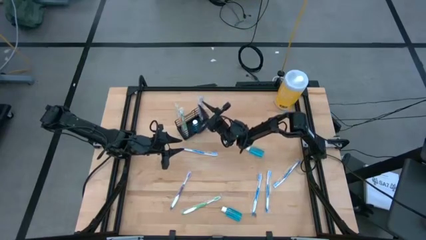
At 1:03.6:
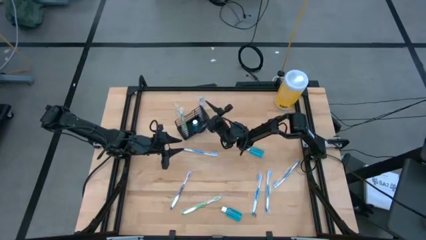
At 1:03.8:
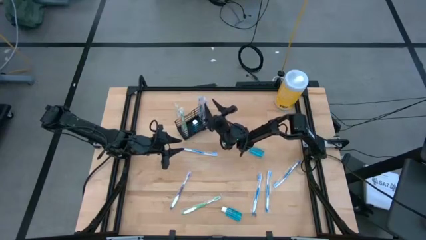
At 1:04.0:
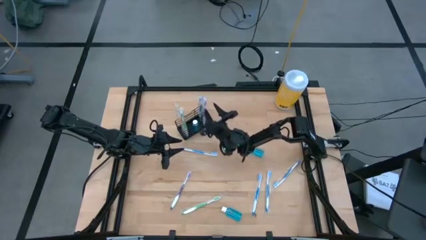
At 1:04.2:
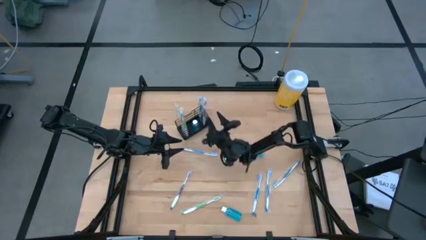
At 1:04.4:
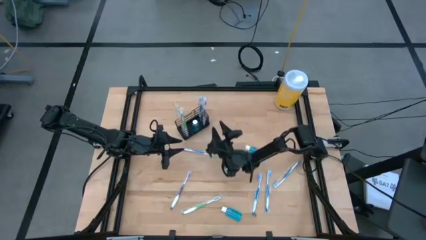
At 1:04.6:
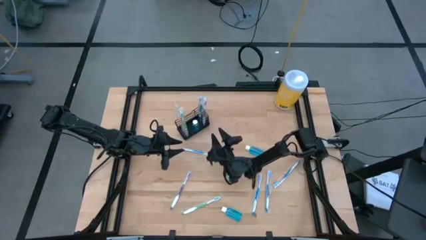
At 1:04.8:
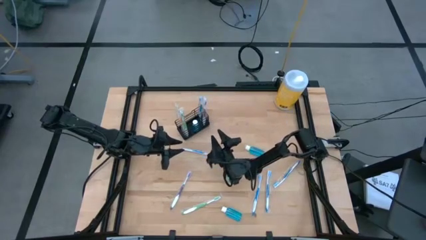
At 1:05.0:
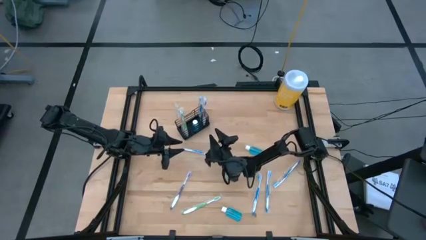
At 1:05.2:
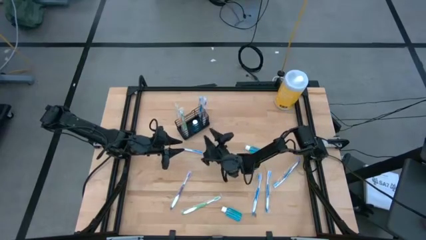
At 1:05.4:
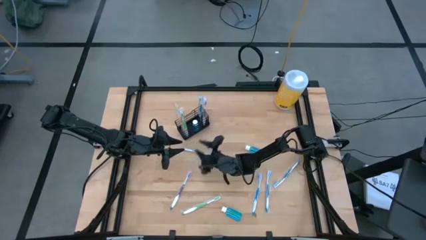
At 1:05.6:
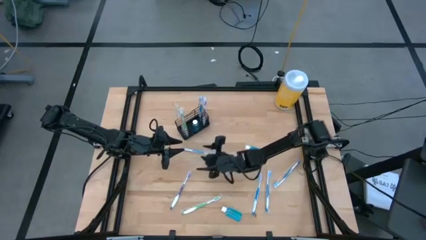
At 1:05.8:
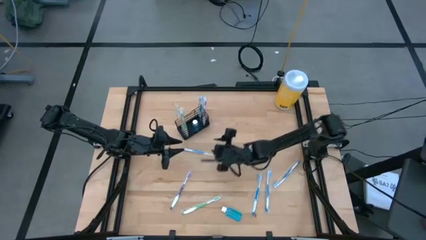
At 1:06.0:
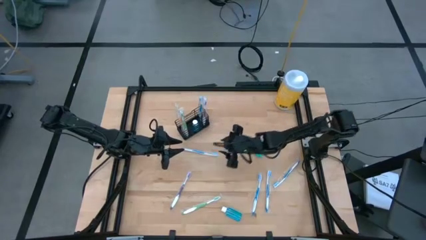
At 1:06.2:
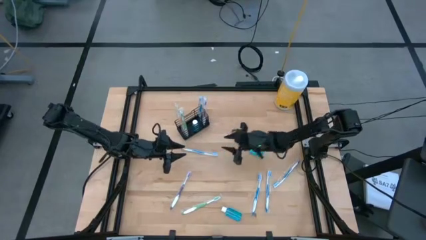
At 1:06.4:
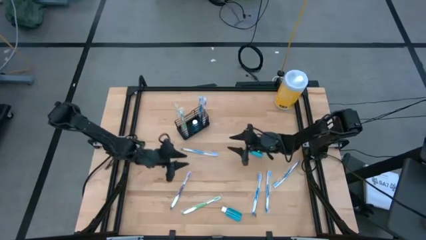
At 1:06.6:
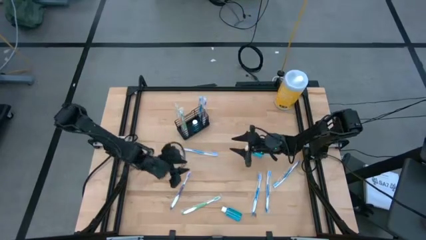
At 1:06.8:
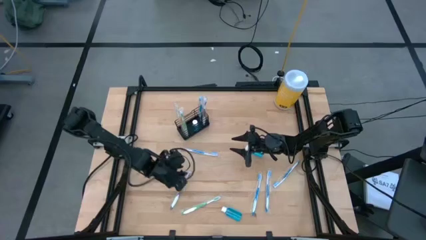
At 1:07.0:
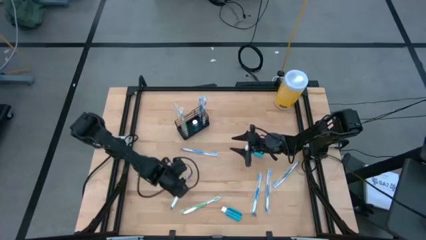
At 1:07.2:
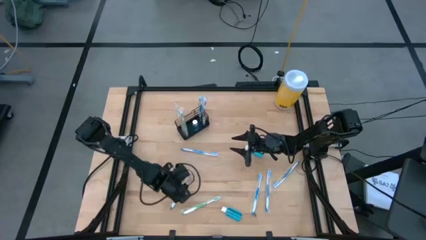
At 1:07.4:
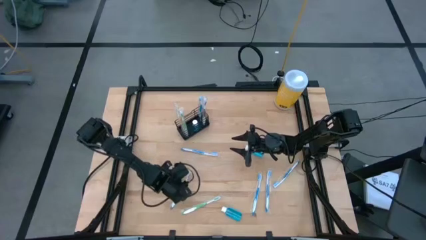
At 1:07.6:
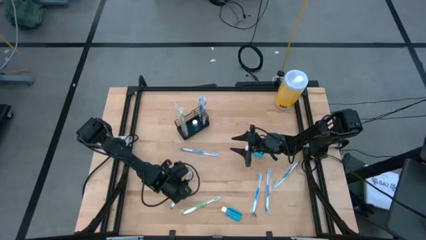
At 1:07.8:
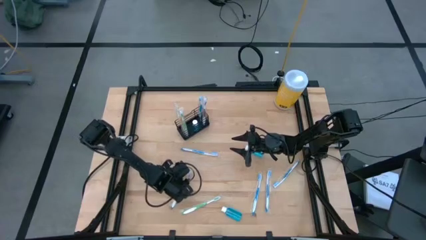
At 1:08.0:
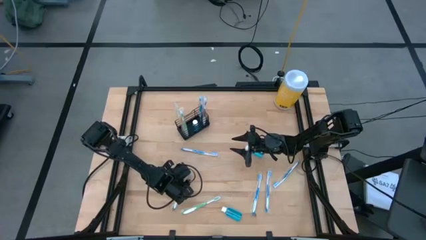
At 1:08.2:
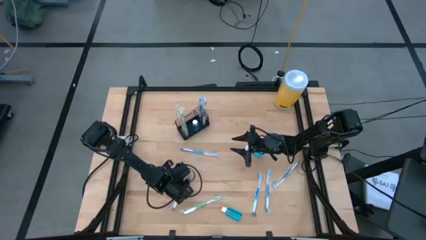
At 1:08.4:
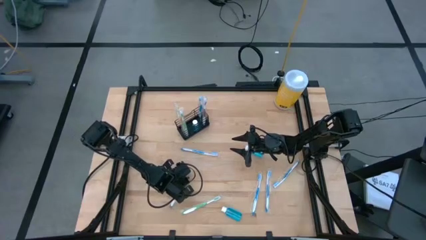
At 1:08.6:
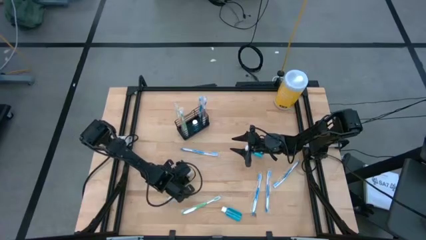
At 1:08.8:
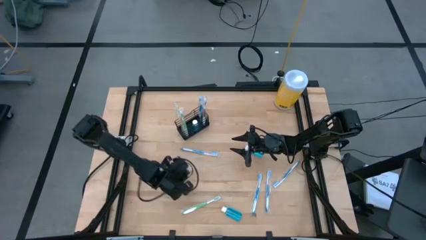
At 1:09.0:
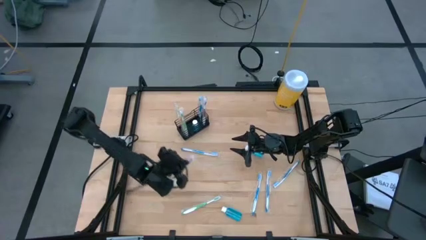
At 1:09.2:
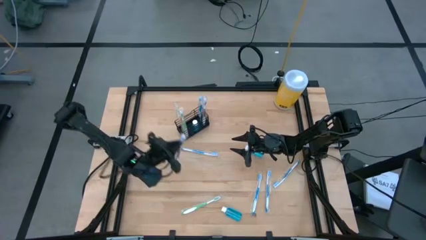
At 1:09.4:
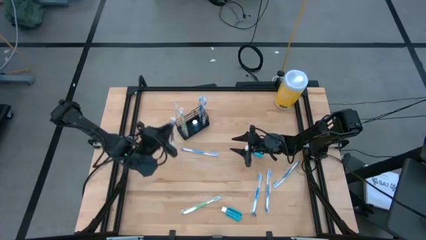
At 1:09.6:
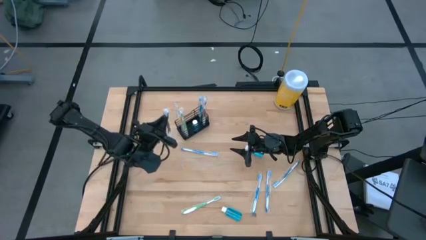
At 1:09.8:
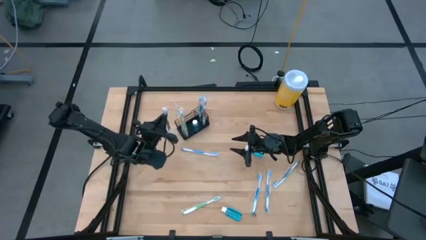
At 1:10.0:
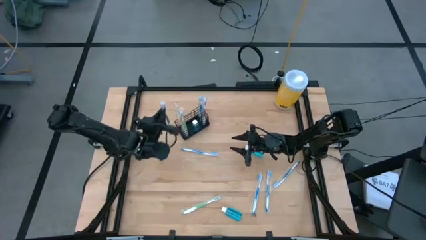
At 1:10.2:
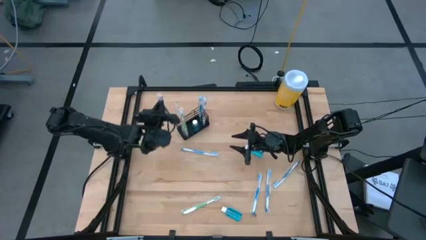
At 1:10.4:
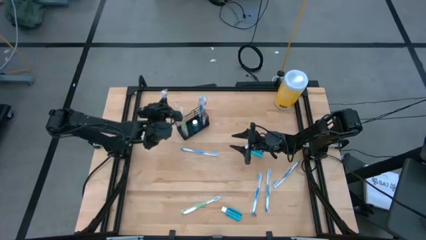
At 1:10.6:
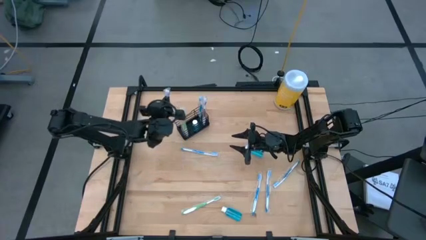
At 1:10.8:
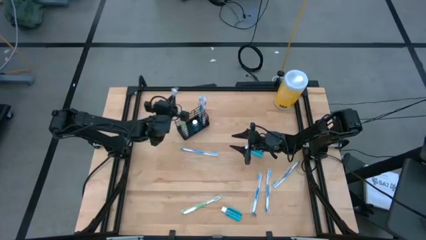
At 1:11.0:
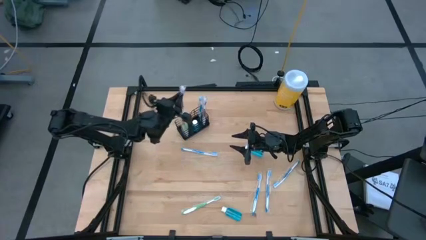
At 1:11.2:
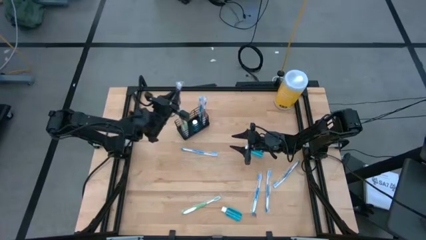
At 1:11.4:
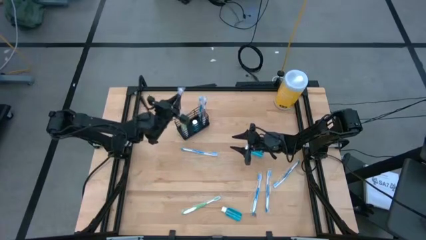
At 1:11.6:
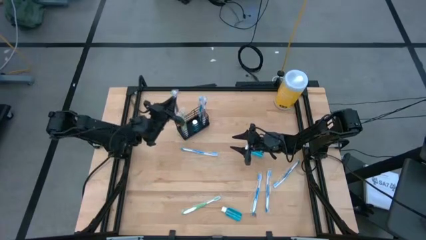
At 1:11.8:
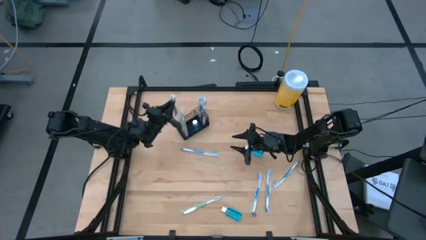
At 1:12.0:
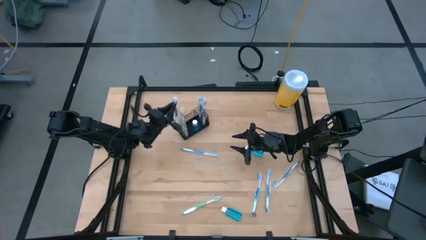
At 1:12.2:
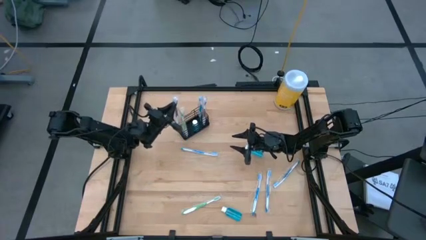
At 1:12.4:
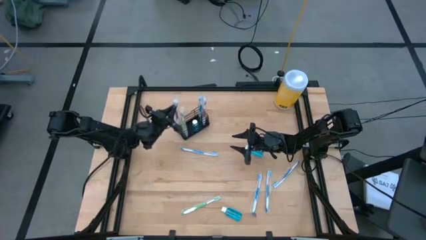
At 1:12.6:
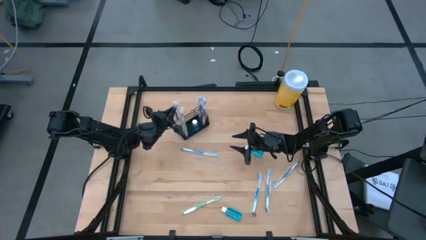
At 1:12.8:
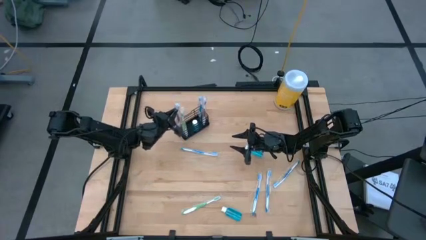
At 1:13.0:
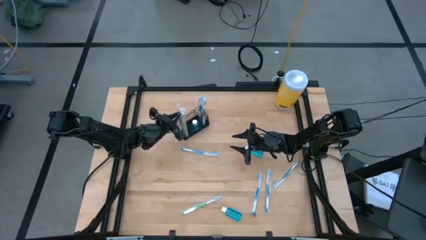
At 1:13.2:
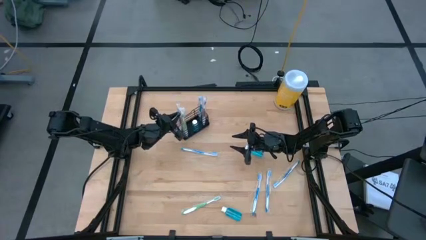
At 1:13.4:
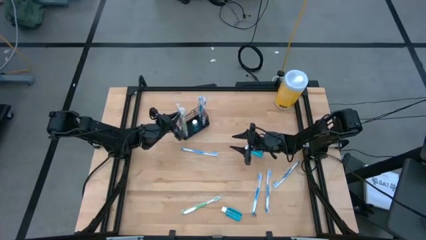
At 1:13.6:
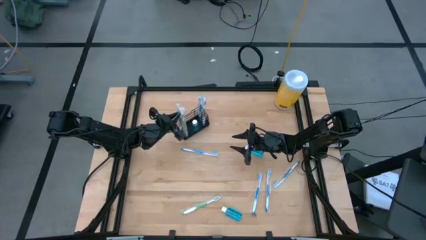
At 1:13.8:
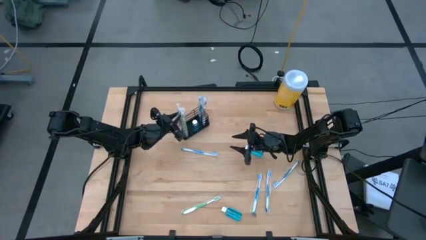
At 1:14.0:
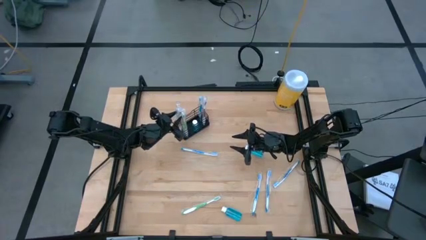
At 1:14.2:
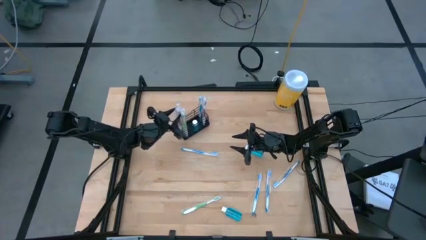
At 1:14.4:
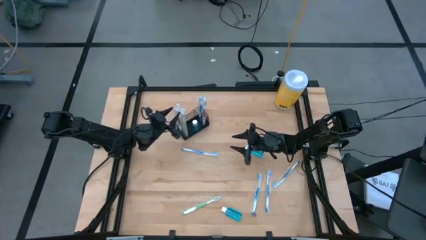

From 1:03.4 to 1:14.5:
Task: Pick & Place toothbrushing station
Put the violet toothbrush into the black wire organizer

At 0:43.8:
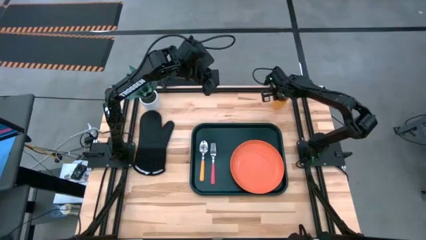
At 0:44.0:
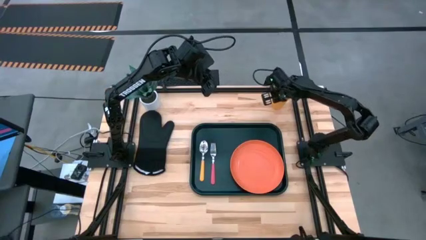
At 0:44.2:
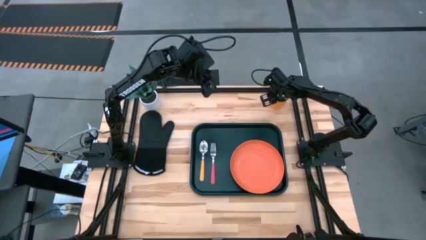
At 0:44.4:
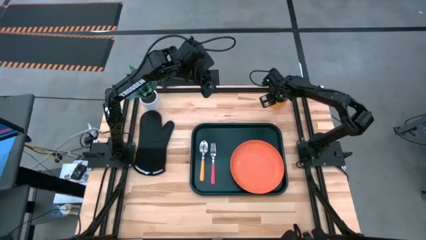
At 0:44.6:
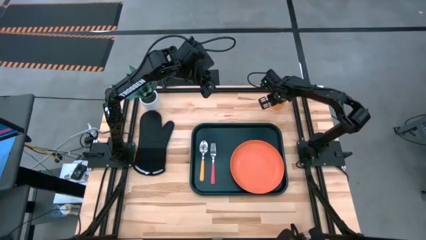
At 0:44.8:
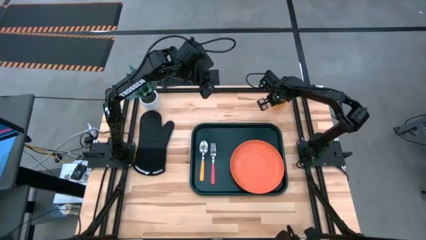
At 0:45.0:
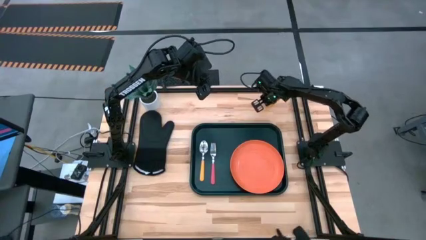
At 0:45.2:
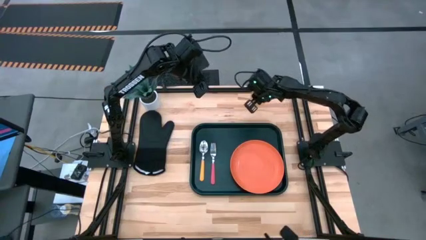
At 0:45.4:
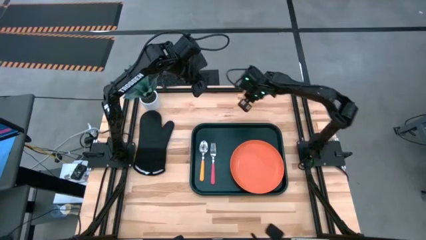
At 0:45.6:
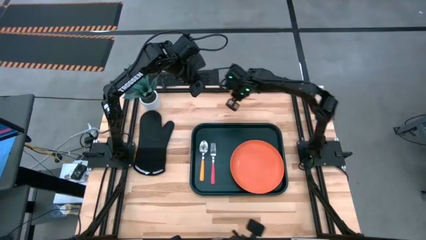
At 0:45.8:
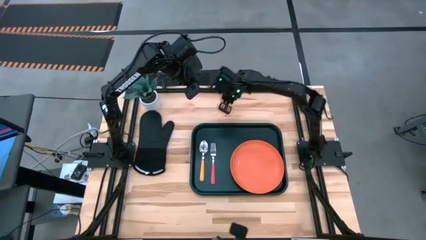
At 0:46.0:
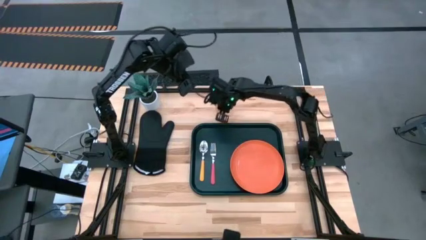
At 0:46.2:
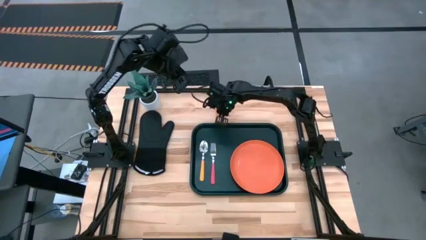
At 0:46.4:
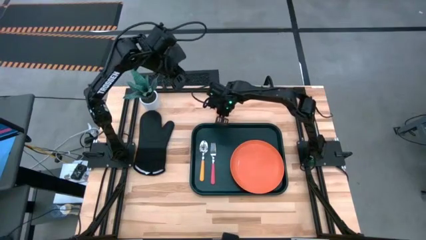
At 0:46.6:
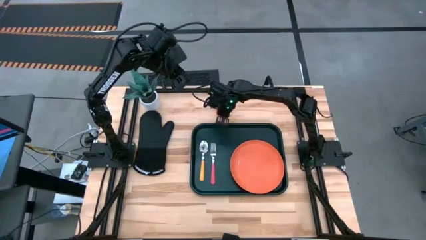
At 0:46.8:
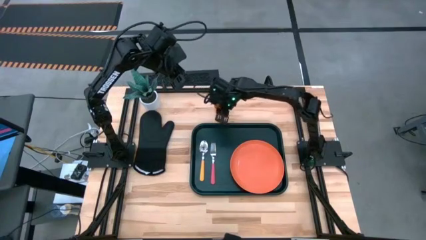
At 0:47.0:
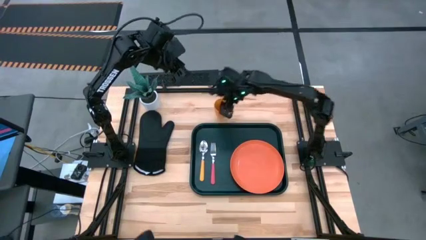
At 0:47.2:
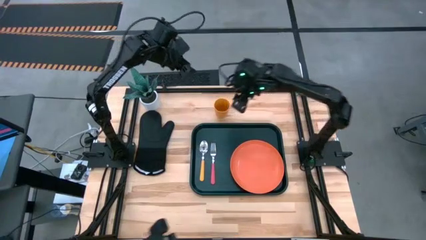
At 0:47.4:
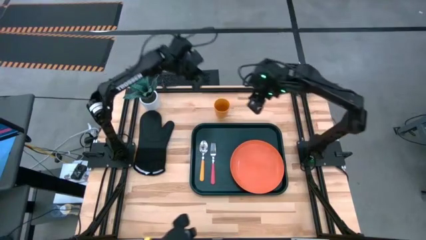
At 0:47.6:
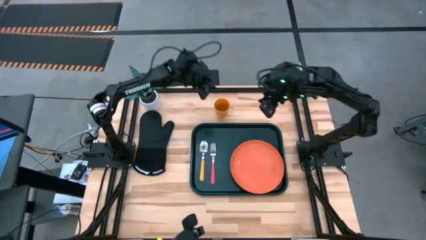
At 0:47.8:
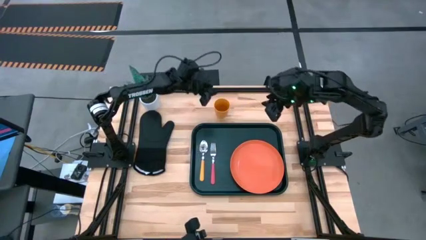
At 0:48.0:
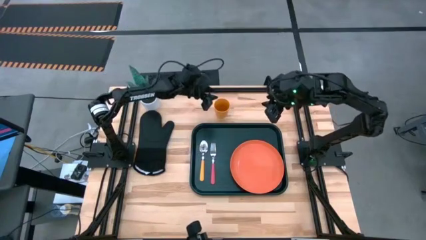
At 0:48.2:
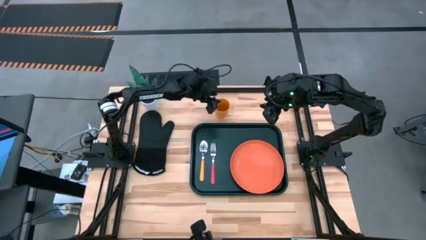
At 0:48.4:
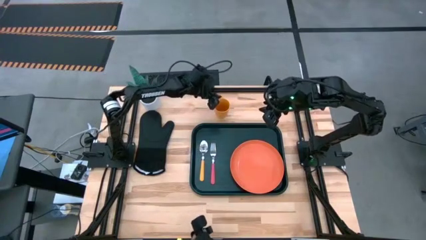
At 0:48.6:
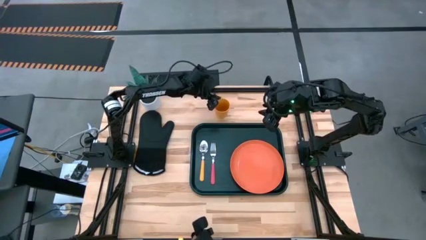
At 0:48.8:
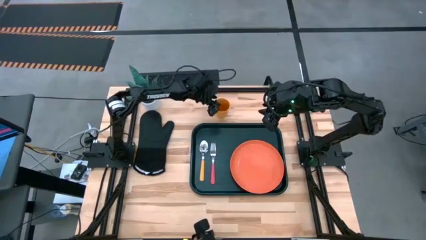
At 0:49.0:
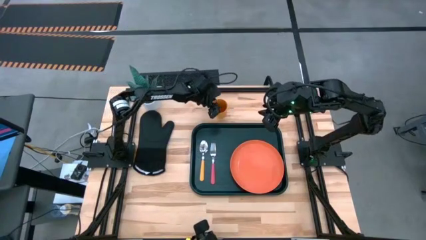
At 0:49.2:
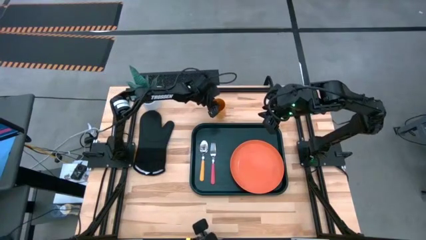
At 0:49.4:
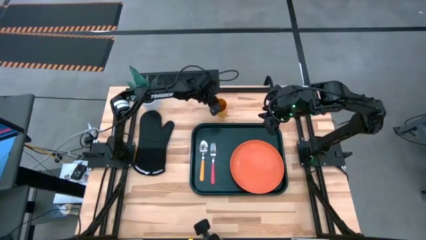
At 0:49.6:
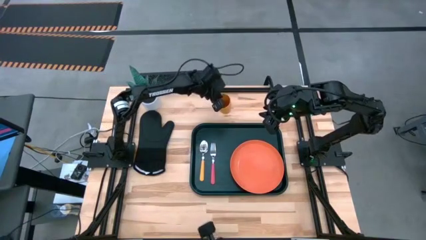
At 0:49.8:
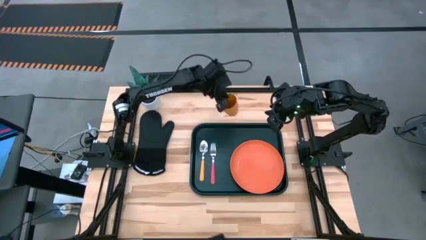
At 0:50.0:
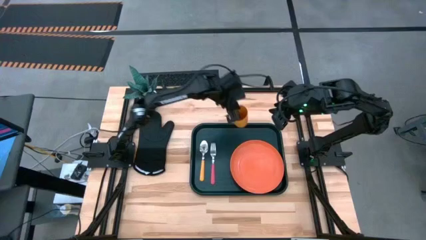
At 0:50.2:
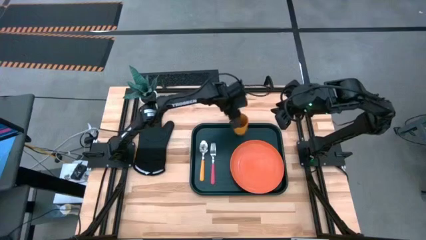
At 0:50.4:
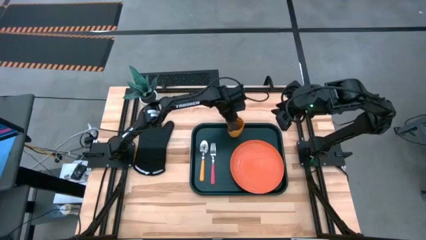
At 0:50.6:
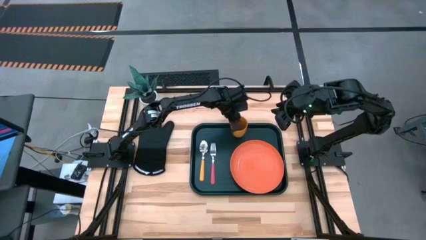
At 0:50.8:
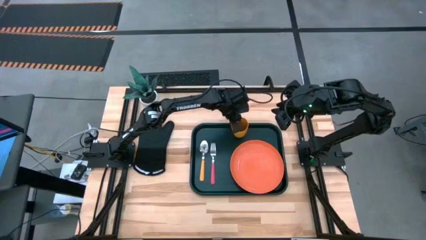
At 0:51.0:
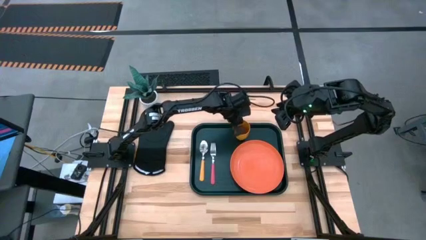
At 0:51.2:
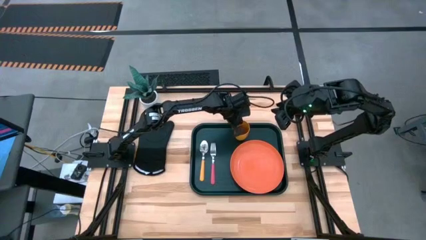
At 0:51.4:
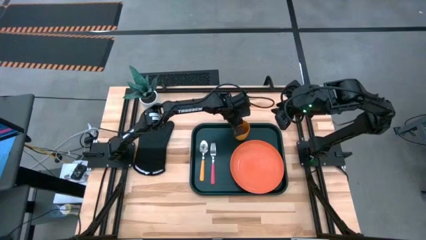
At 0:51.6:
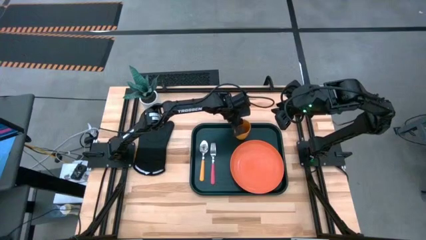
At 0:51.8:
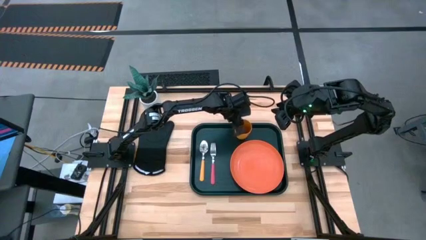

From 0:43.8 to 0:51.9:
Task: Pick and place plate/cup/fork/spoon on tray
Put the yellow cup at the top of the plate on the black tray
